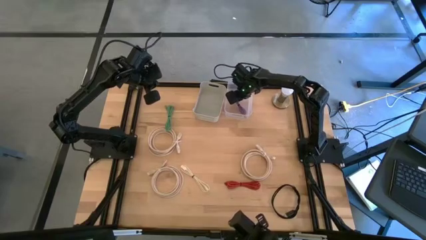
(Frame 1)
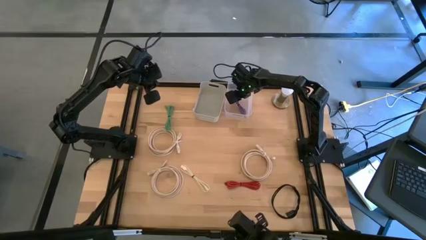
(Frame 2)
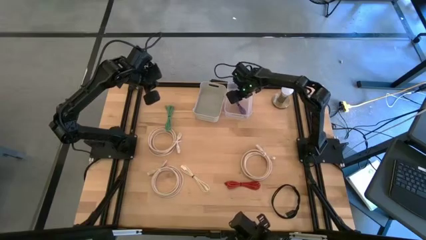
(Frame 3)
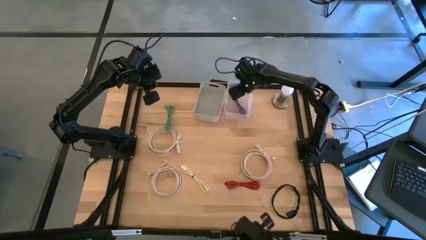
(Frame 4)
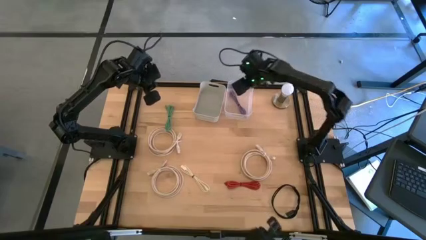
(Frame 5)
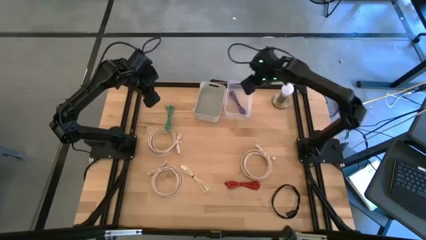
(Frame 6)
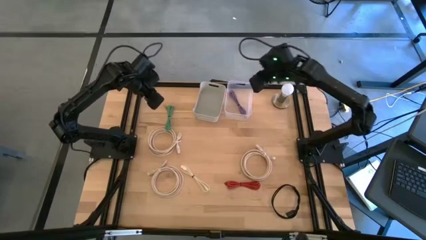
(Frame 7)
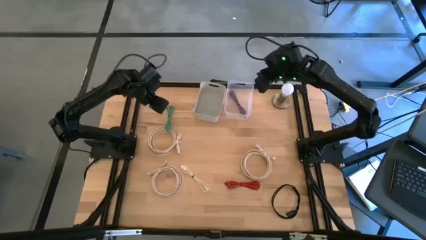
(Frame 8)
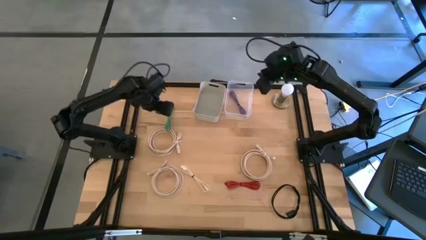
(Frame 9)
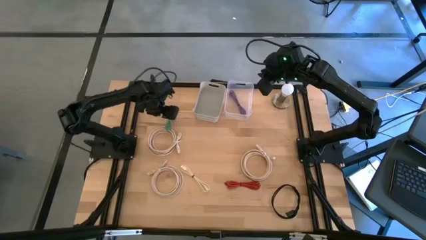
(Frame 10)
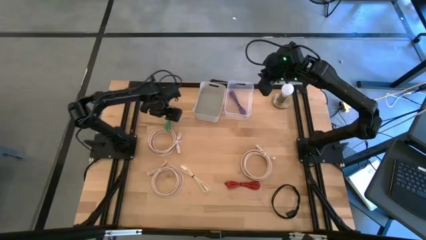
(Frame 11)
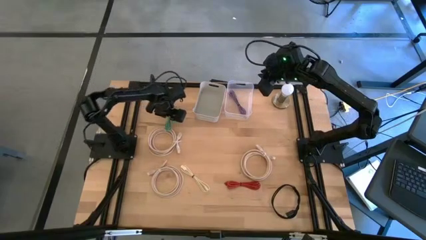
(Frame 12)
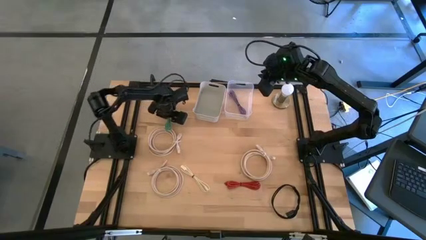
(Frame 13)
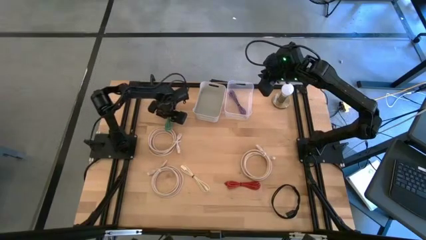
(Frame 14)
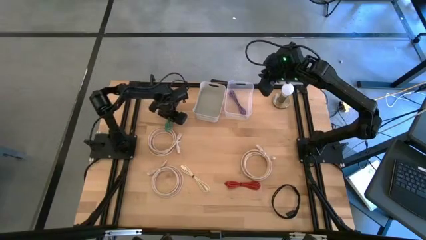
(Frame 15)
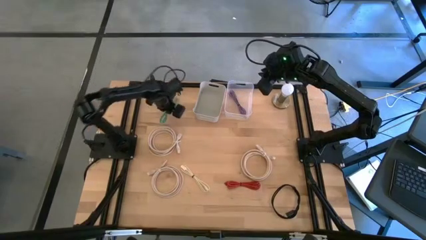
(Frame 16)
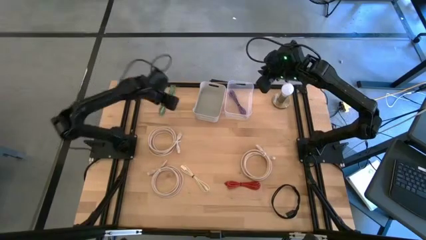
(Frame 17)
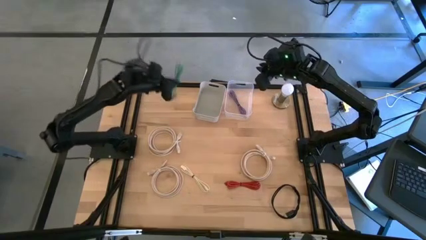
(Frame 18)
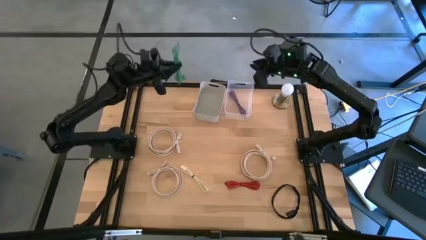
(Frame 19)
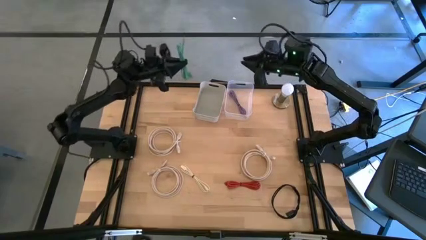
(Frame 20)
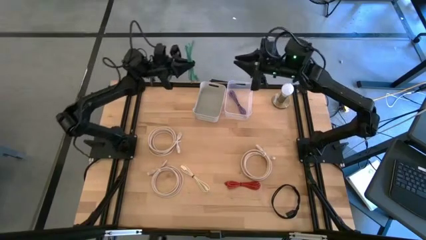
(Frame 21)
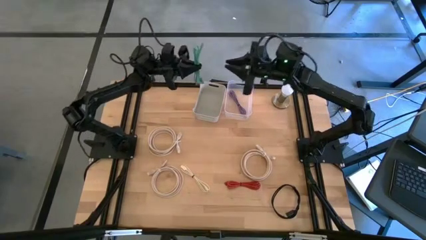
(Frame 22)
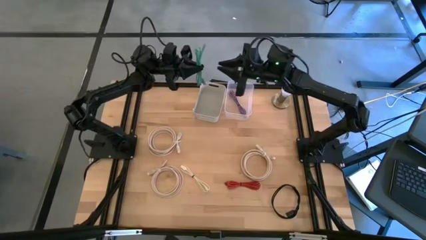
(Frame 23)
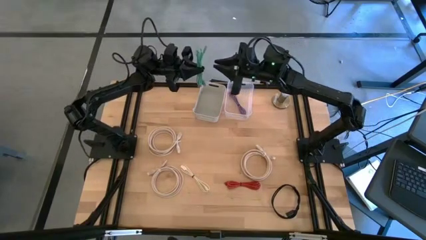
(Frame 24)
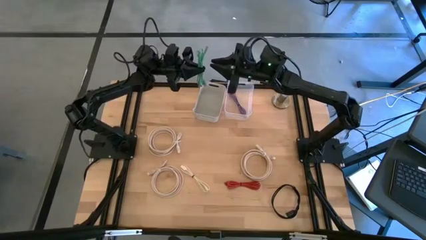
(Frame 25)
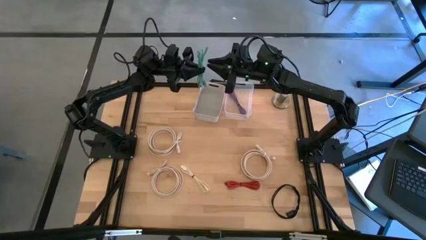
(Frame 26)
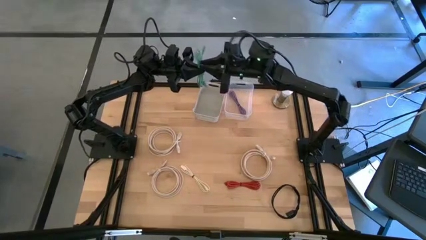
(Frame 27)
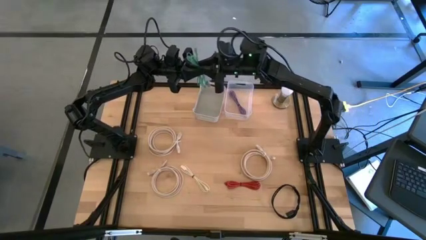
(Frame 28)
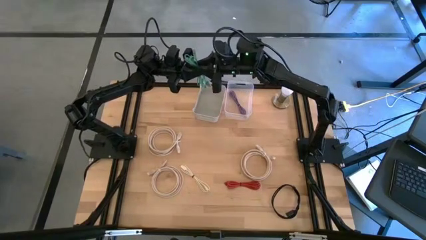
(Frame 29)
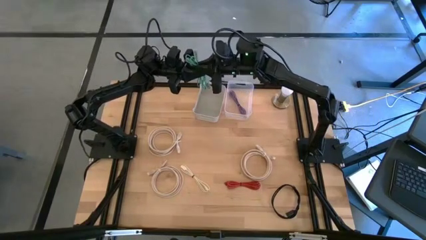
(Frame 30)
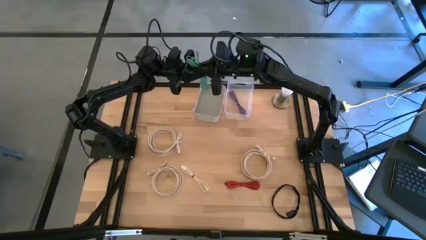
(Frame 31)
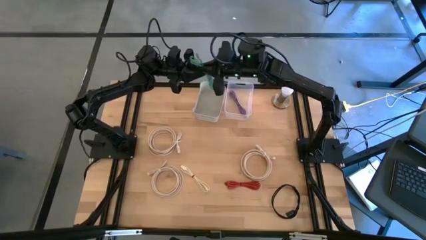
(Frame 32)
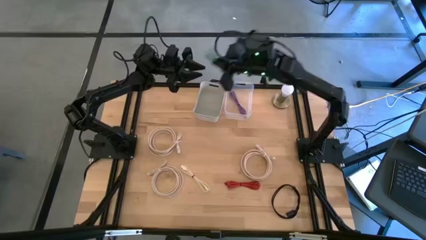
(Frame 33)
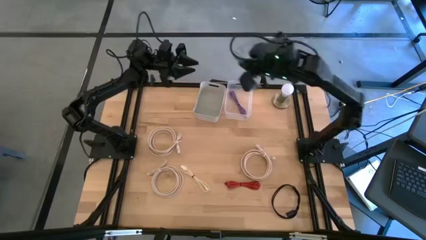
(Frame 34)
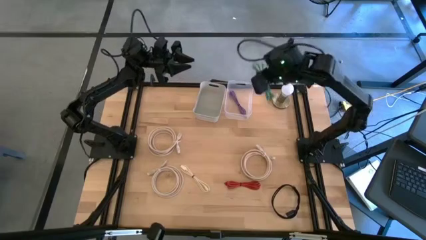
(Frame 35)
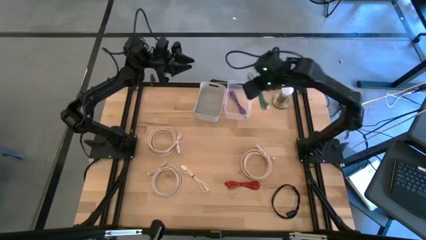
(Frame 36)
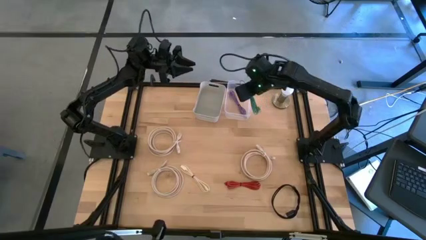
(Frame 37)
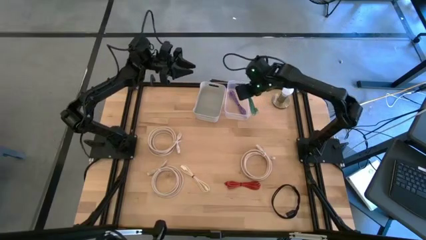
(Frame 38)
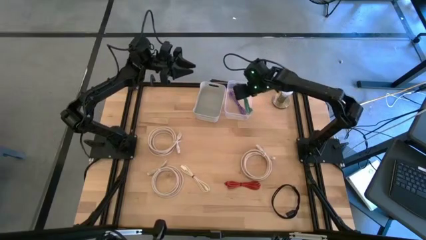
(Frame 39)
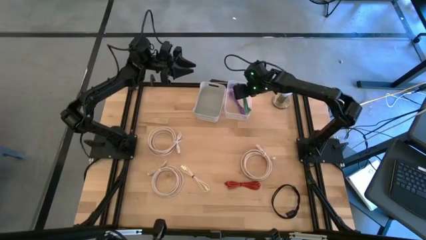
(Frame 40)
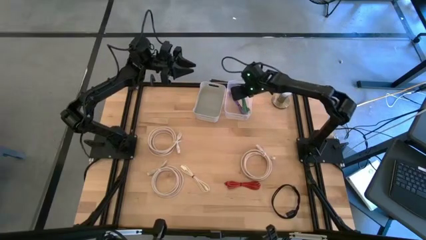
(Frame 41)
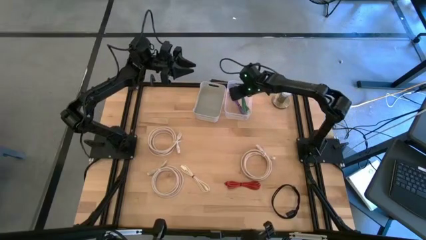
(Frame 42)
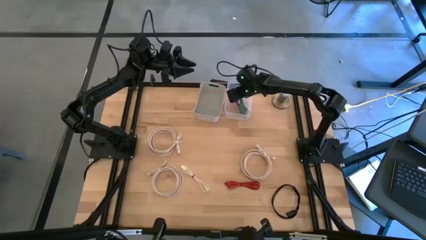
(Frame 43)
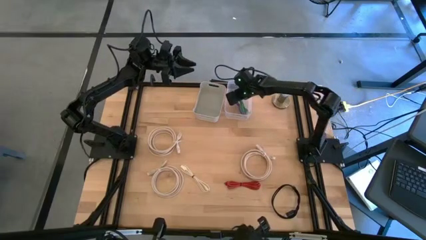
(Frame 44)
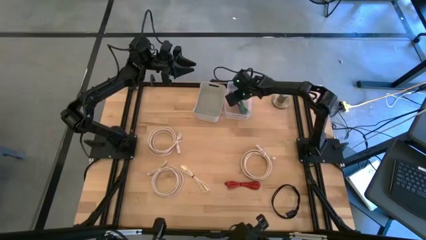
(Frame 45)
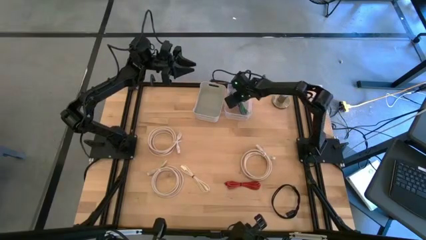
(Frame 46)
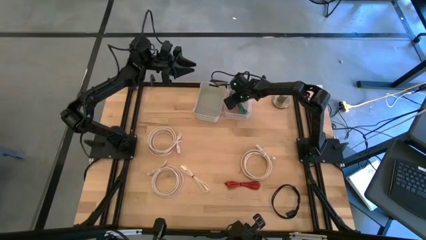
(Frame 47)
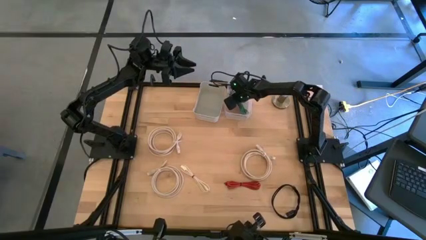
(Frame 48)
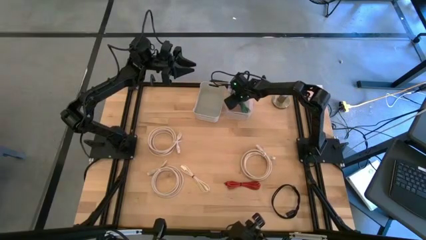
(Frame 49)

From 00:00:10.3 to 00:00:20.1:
Put the green usb cable into the transparent bin

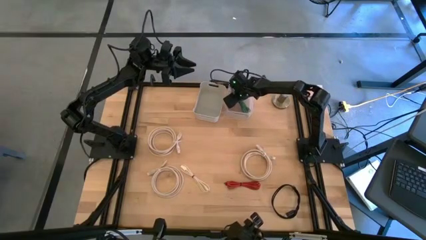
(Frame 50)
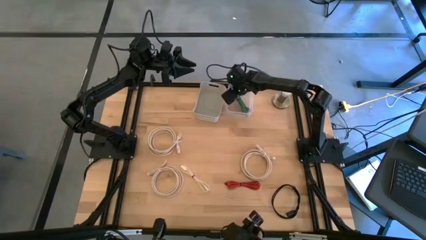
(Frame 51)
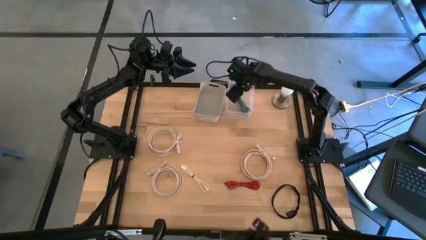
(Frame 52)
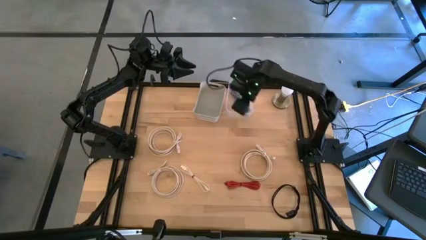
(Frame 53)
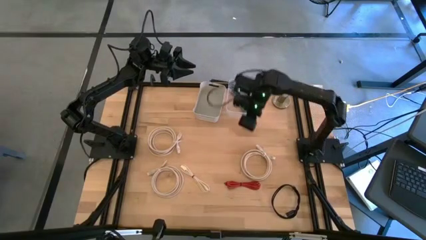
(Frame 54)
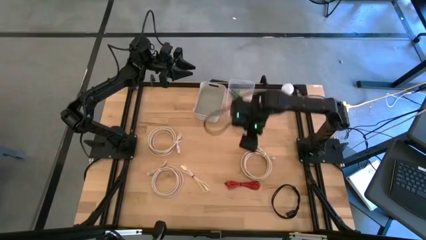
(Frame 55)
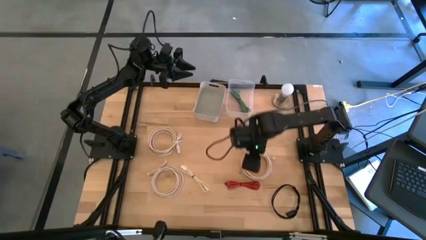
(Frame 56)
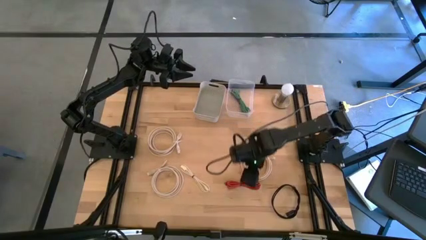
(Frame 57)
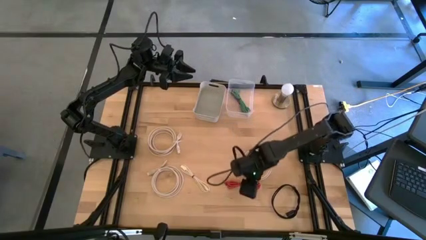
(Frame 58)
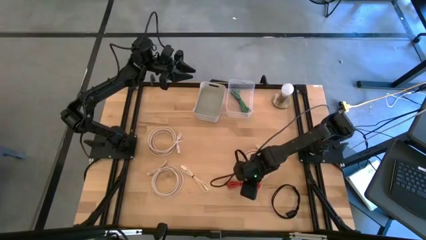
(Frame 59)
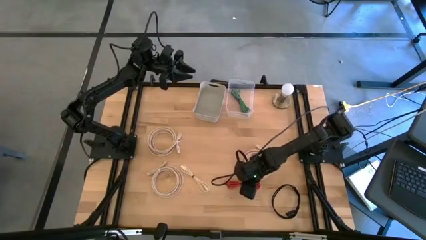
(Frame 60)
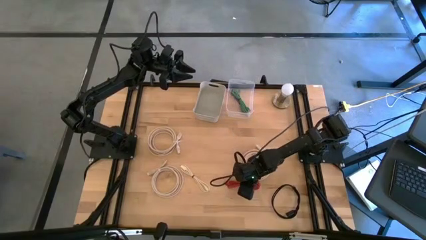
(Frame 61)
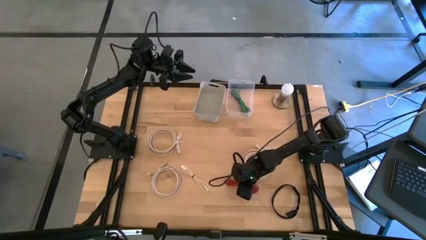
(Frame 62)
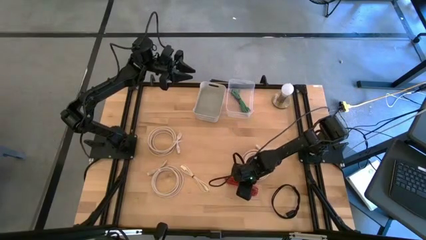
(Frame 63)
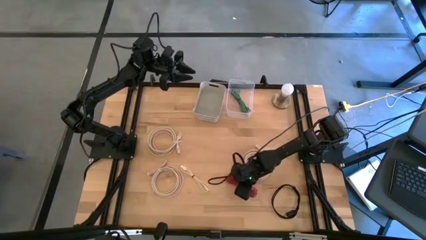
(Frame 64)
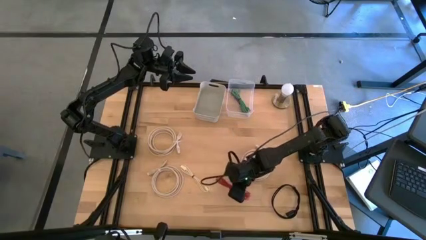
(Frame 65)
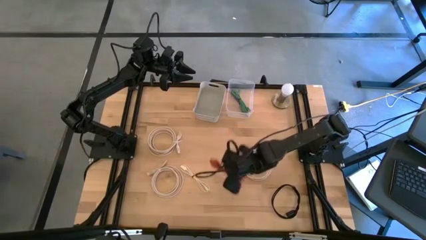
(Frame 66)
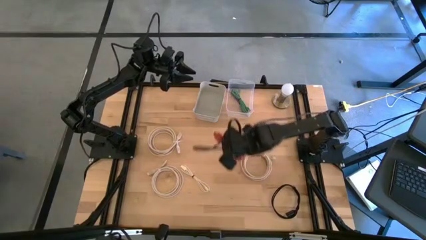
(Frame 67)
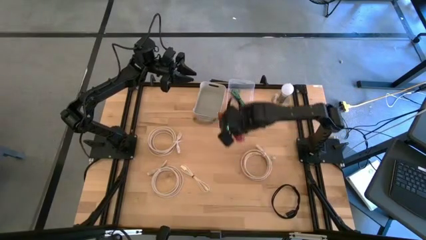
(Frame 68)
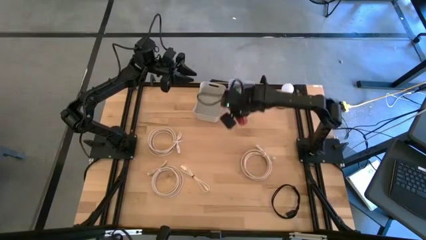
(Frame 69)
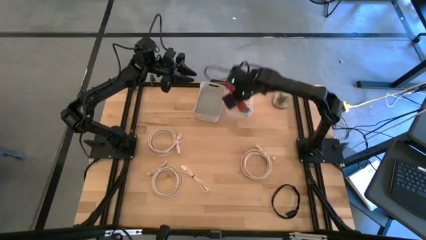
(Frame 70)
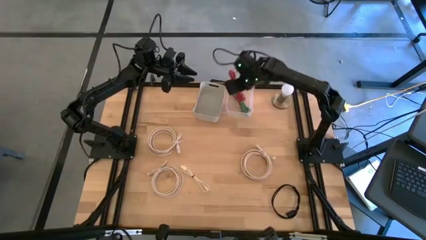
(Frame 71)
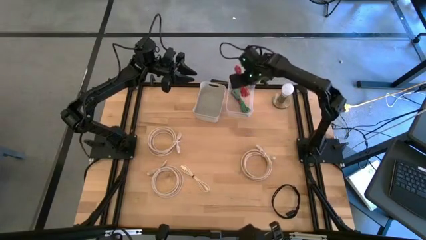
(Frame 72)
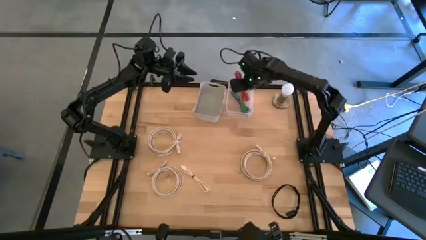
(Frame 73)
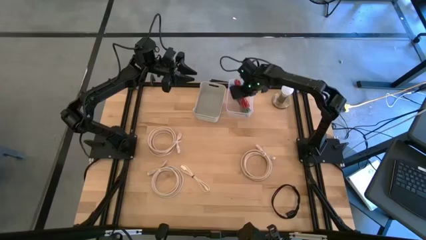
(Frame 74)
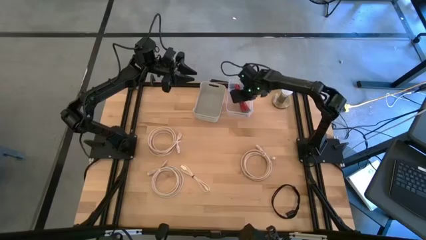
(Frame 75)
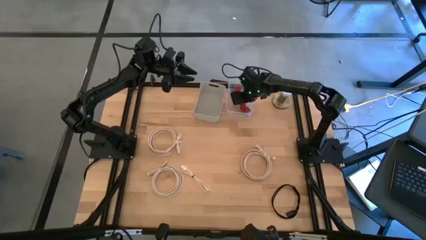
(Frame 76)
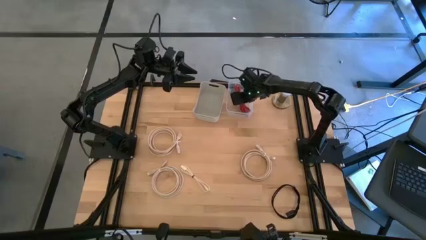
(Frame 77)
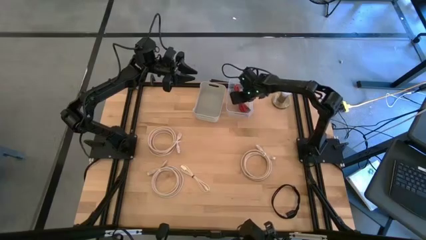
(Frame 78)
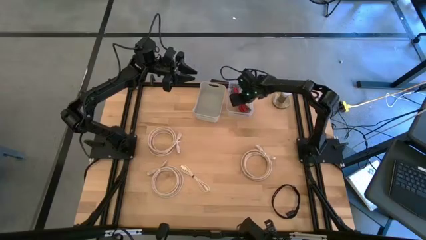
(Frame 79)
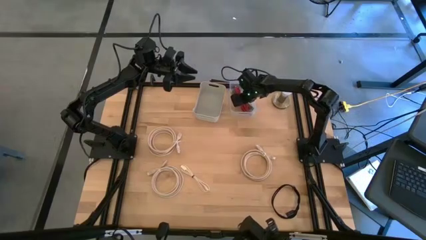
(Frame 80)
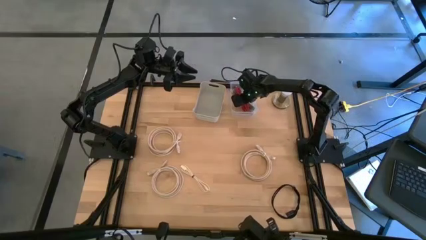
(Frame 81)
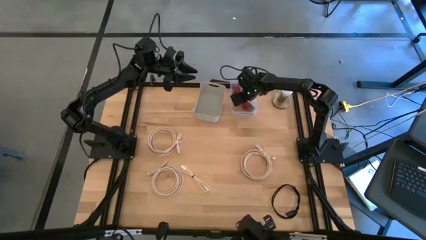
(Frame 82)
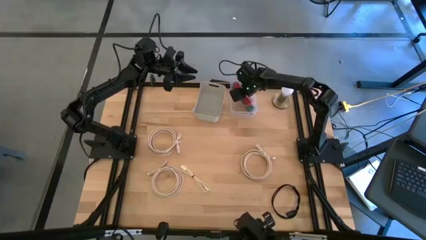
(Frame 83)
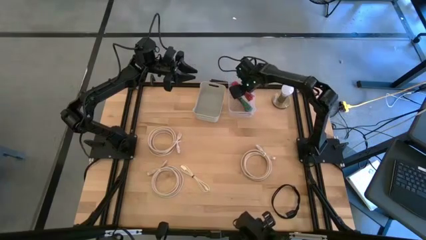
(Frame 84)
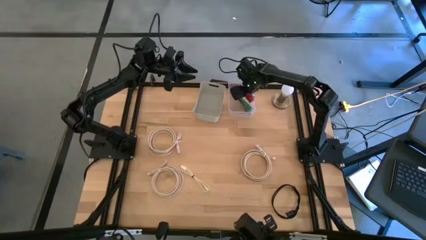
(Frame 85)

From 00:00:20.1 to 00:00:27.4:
Put the red usb cable into the transparent bin
